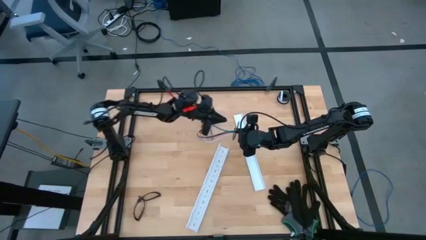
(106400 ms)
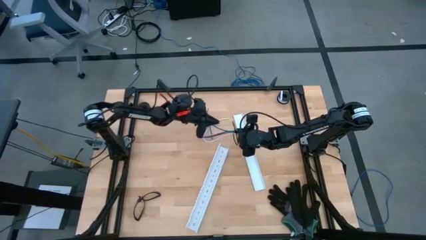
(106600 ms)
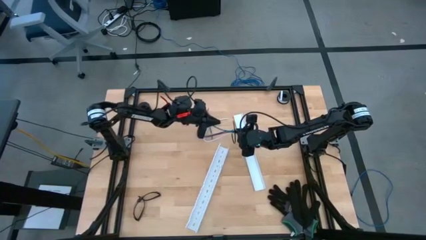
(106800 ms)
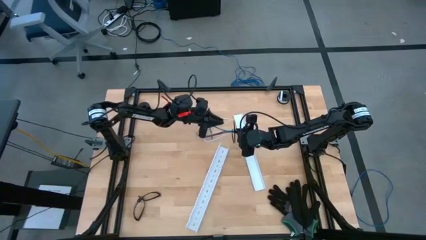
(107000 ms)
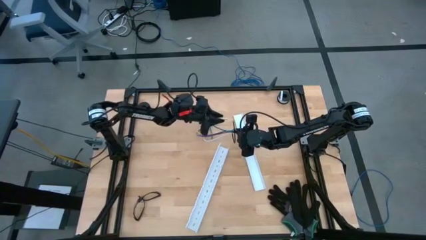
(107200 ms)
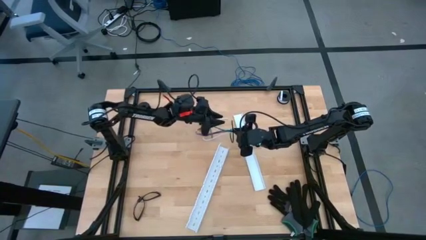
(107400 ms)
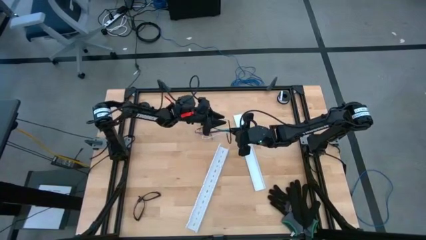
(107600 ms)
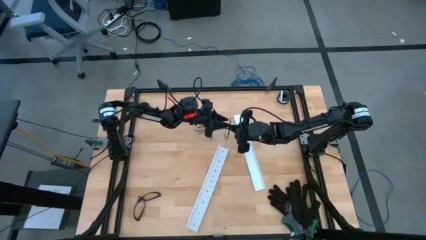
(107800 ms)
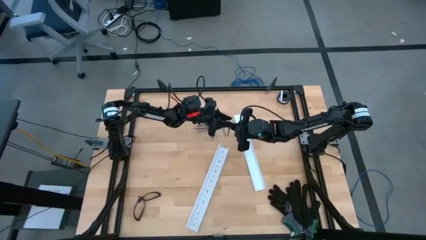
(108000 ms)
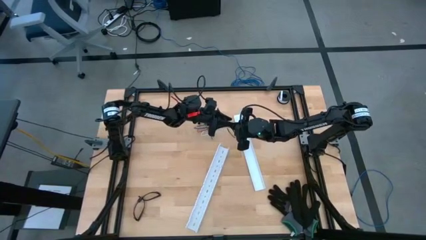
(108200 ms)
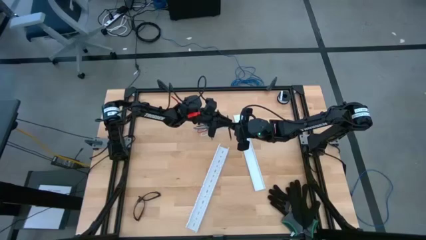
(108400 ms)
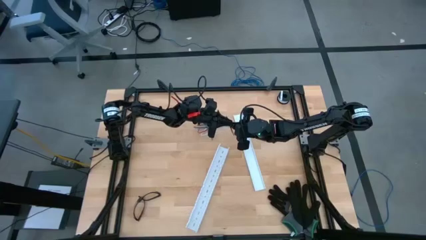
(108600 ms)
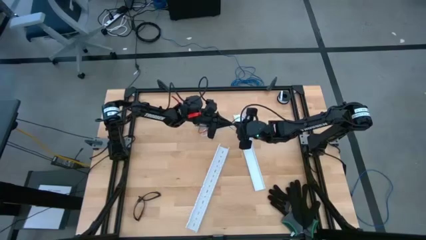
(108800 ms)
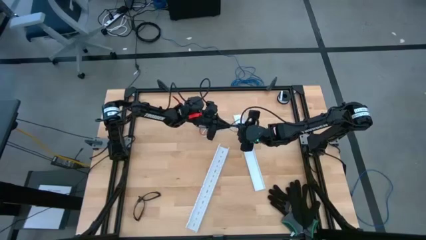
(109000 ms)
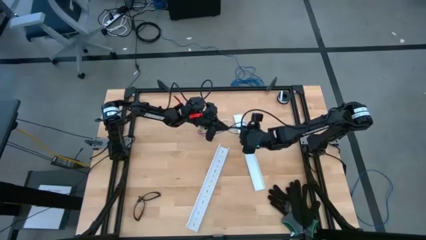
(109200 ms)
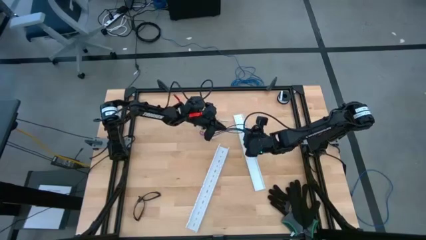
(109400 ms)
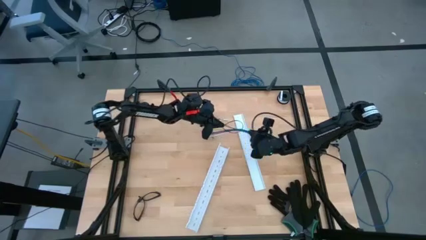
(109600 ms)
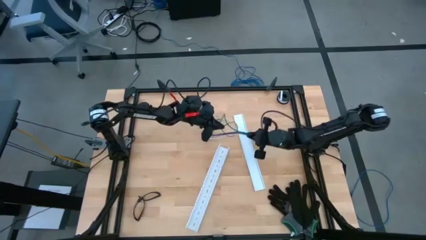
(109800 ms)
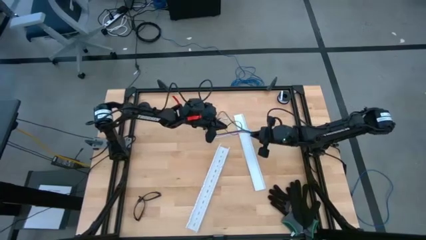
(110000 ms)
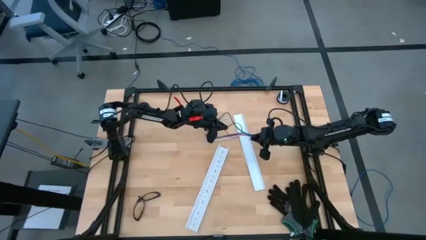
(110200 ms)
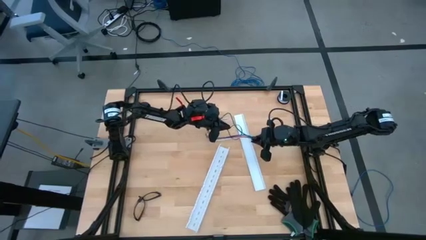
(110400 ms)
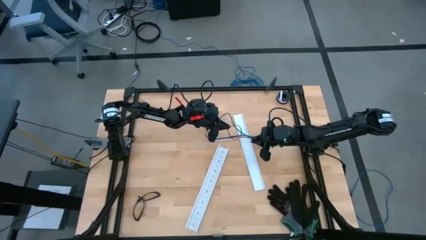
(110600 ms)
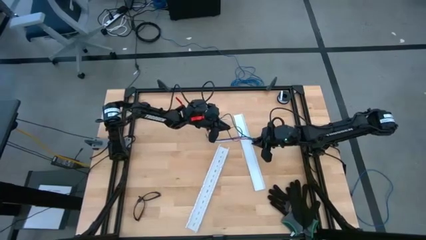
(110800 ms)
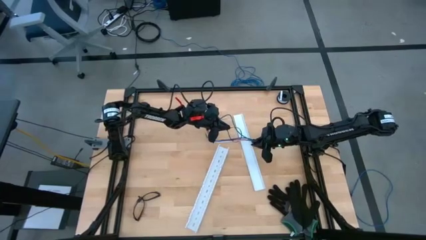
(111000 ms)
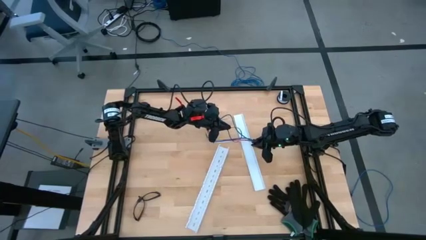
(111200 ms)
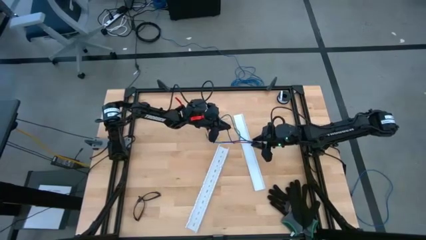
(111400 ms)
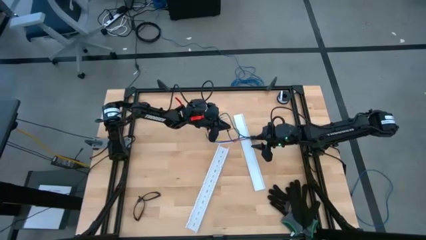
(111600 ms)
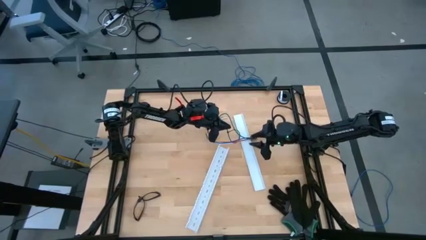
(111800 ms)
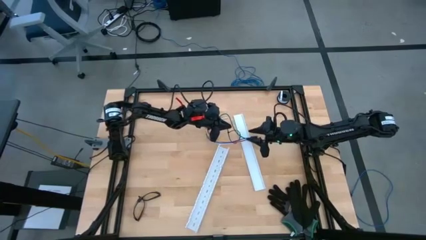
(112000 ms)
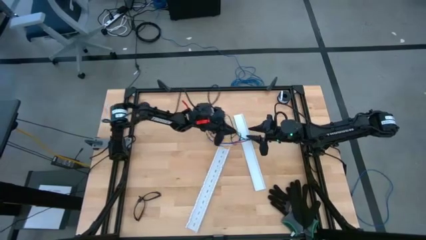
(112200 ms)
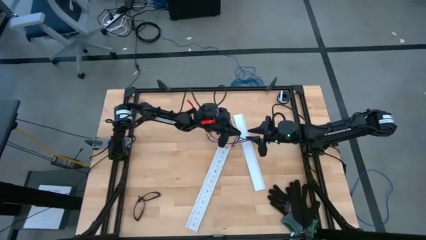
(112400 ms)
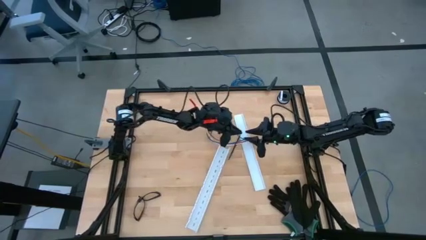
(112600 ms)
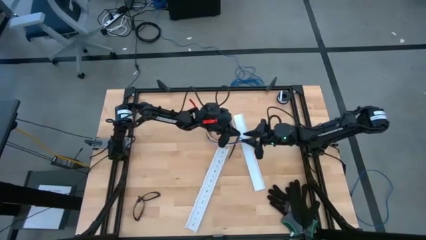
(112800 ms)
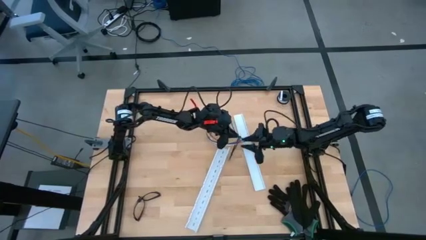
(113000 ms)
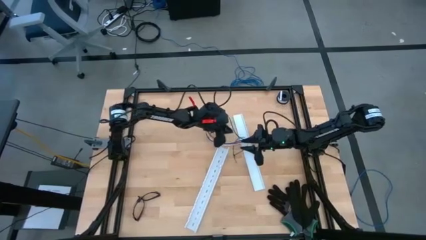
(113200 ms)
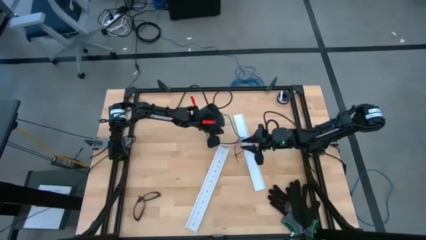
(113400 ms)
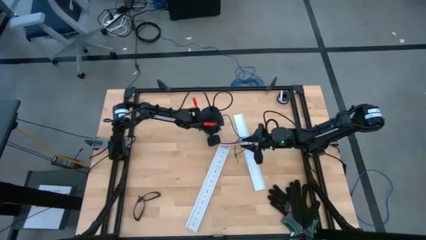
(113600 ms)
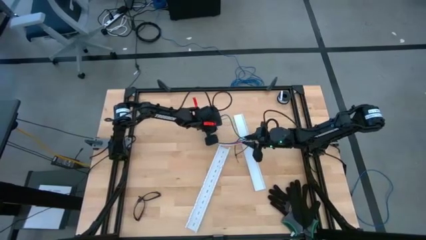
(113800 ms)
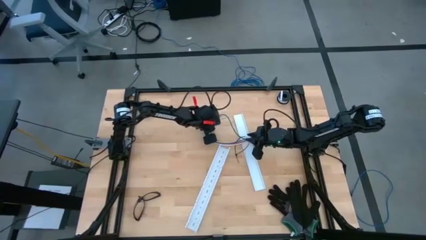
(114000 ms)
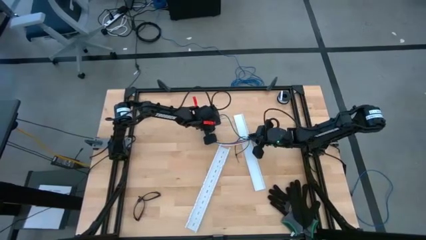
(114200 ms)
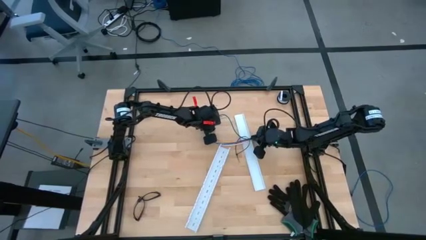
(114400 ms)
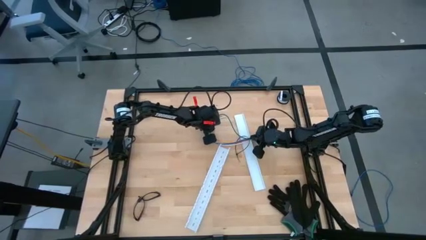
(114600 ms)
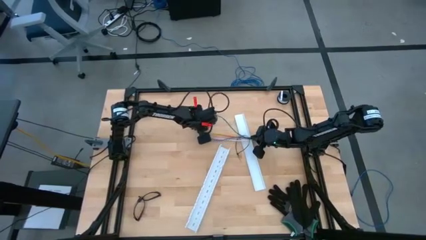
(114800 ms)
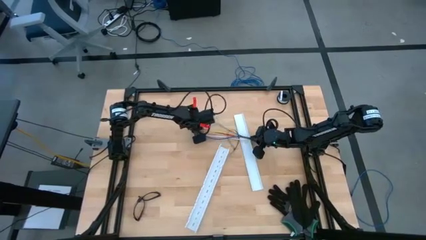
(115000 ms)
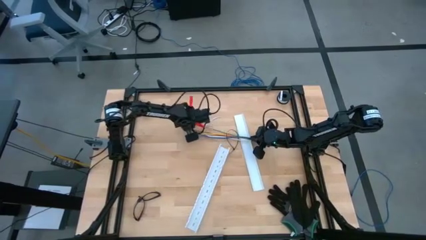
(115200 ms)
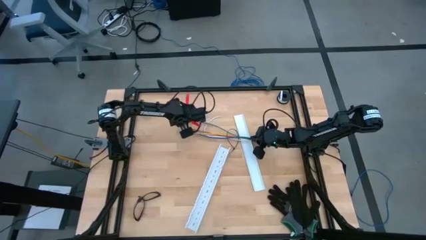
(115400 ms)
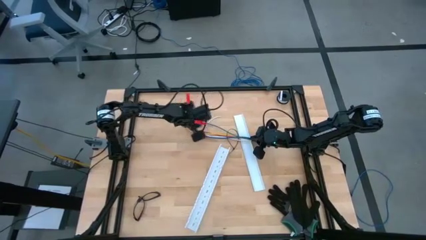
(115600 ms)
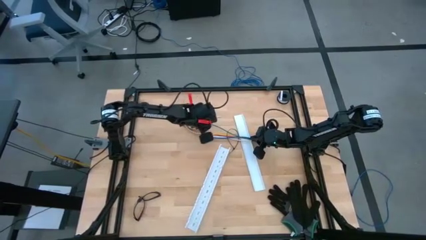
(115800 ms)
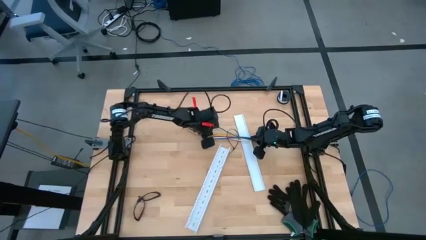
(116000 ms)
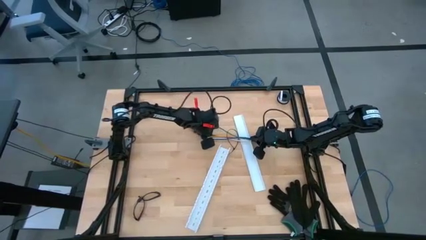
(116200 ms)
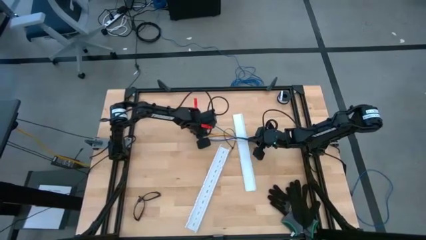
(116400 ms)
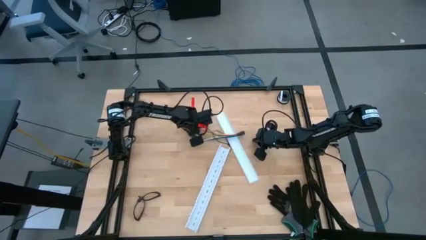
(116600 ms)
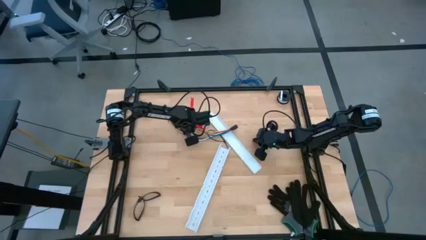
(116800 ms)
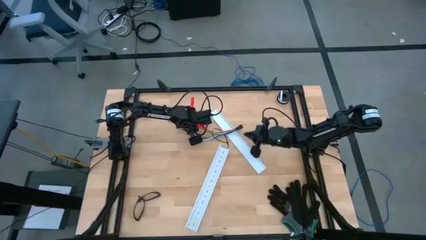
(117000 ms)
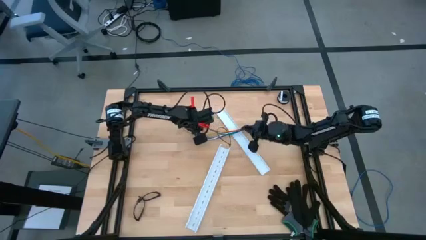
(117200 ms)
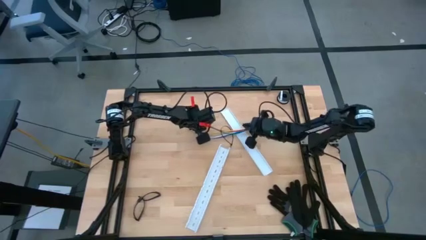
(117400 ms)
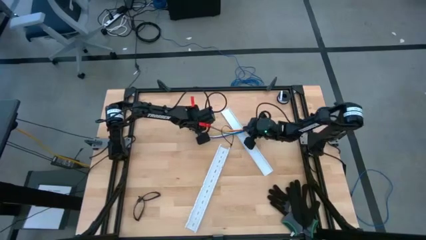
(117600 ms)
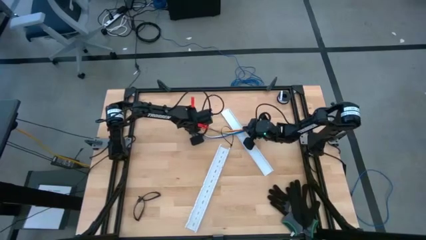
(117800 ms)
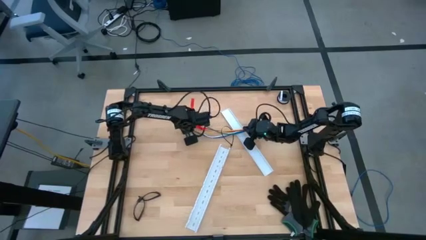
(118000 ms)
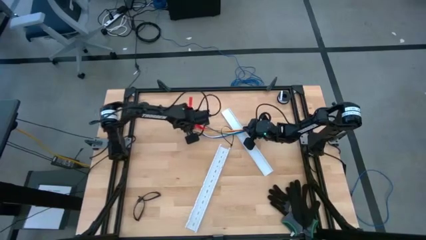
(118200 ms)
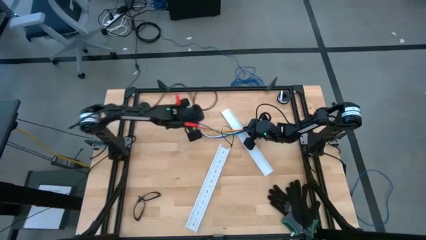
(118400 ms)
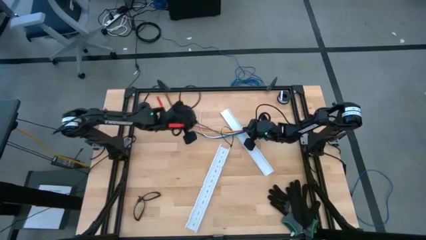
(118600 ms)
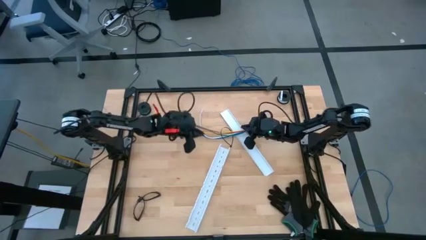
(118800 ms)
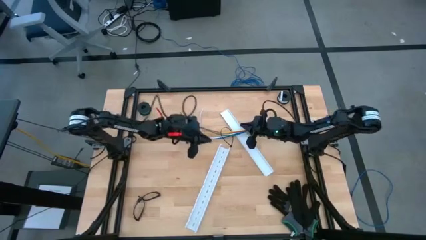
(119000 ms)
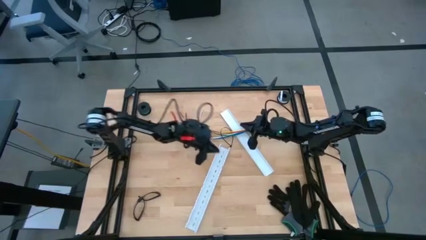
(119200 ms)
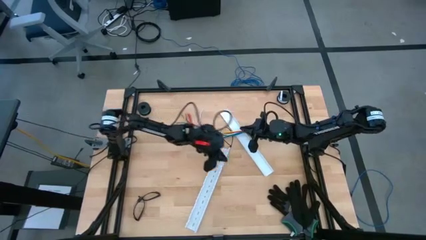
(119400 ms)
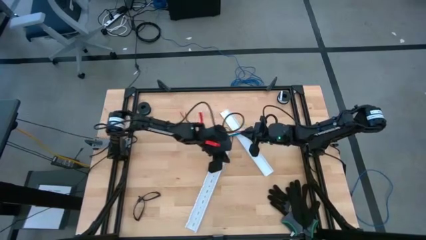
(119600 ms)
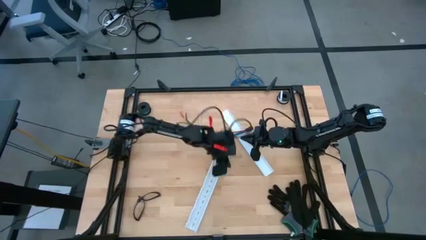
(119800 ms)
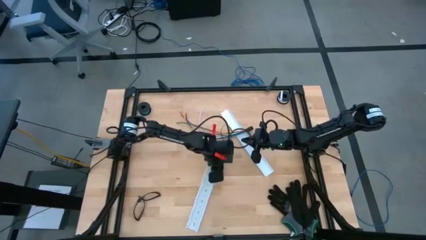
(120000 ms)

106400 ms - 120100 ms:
Task: Ziptie cables
Wrap the cable wire in the zip tie

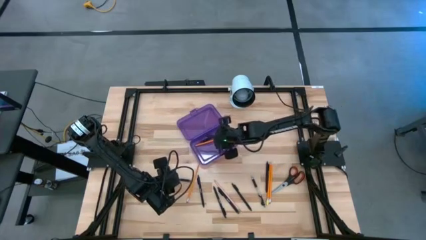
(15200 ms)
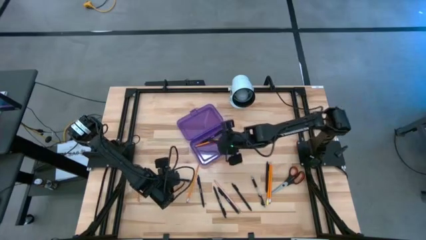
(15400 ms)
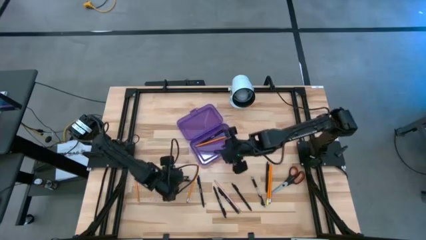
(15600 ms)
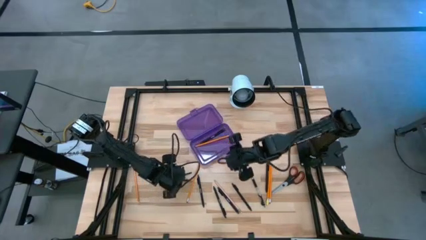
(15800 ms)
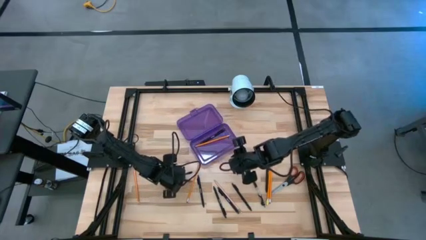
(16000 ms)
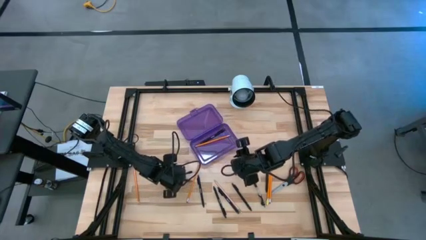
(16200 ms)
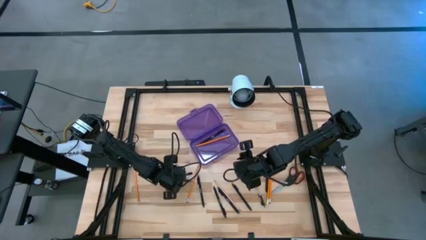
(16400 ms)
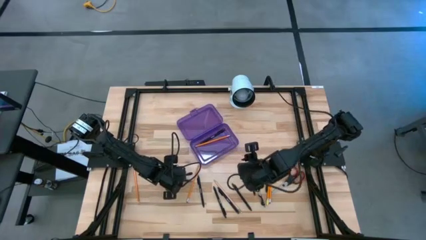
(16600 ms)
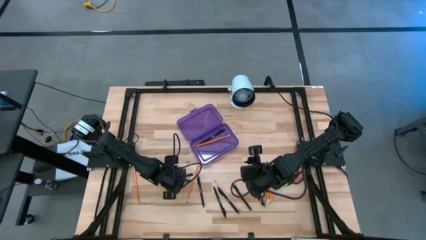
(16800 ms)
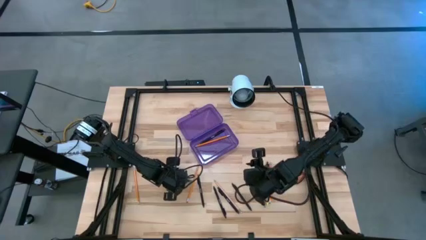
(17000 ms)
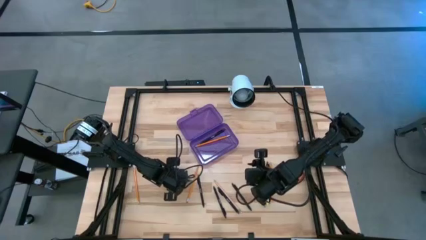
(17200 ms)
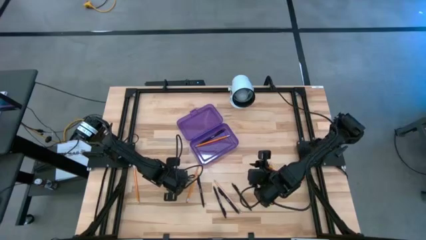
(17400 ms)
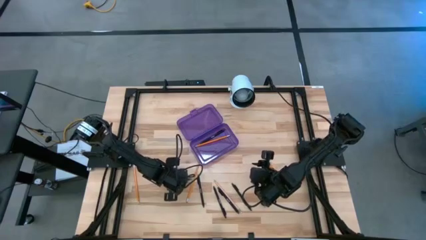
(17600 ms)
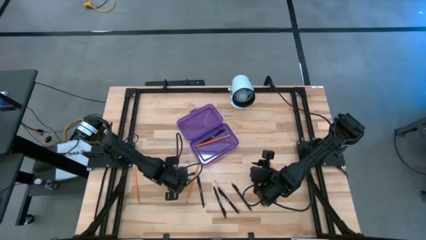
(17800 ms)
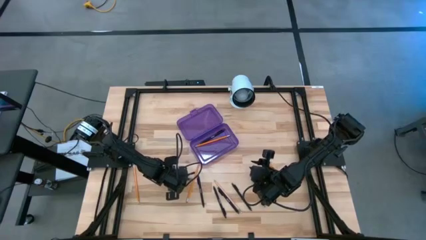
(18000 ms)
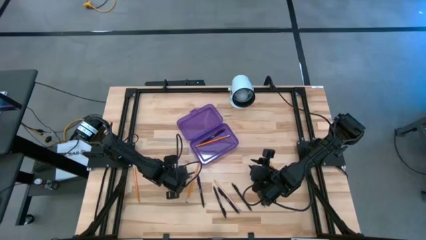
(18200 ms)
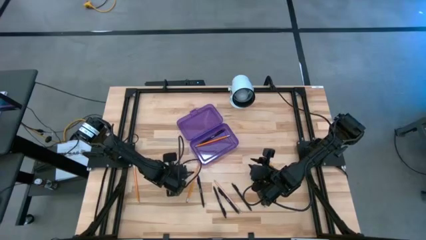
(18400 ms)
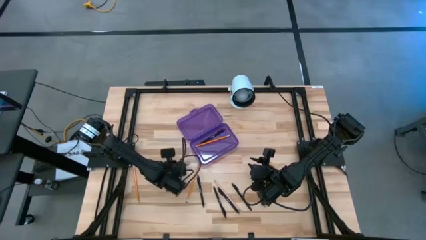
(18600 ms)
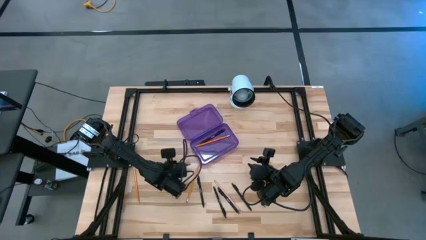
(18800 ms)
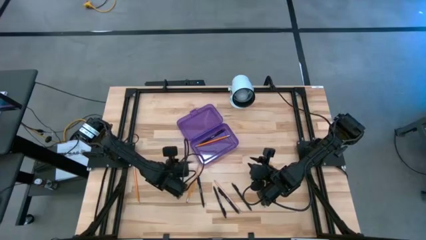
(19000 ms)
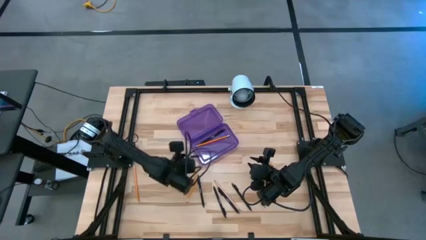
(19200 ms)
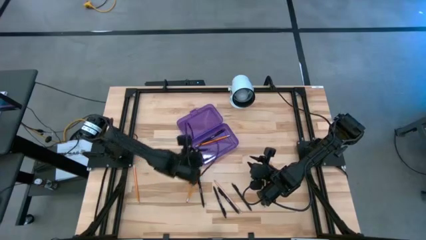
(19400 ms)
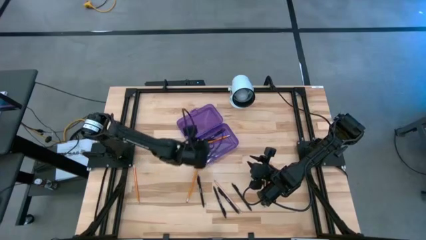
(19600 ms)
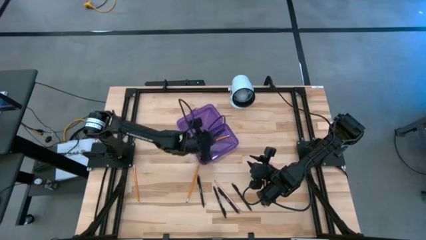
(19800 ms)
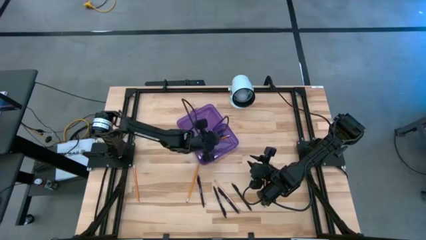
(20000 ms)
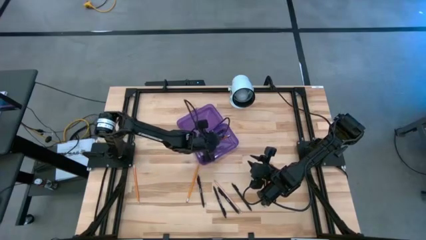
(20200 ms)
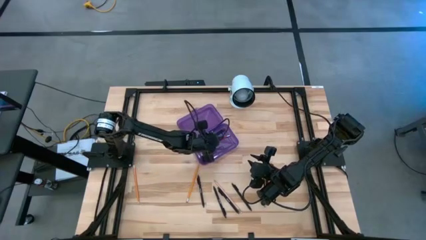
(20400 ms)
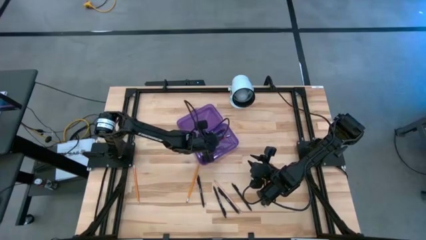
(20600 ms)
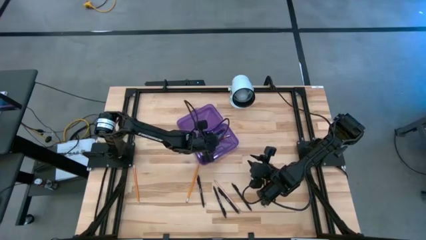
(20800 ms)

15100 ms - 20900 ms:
Task: Pick & place school supplies into a supply box
Put the transparent pen into the purple supply box
